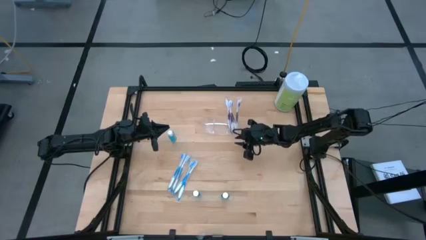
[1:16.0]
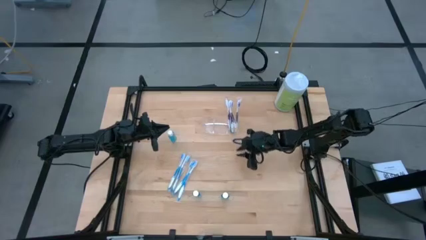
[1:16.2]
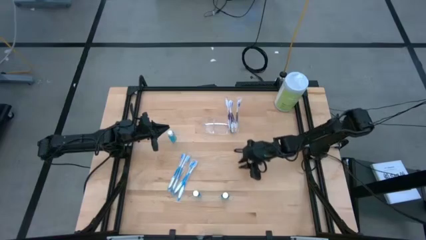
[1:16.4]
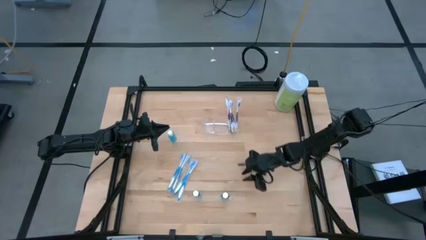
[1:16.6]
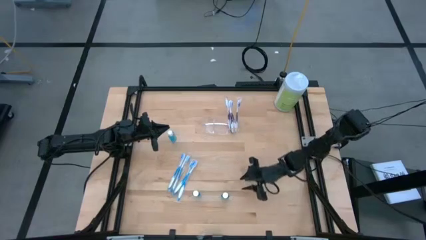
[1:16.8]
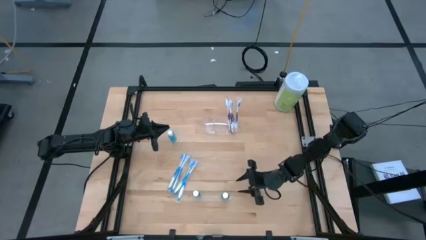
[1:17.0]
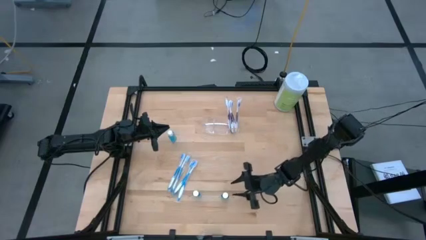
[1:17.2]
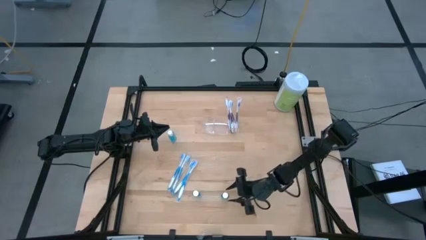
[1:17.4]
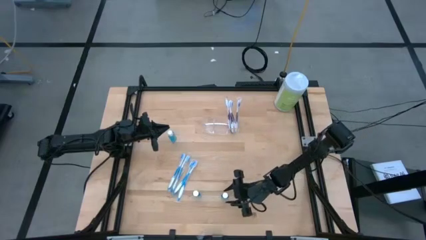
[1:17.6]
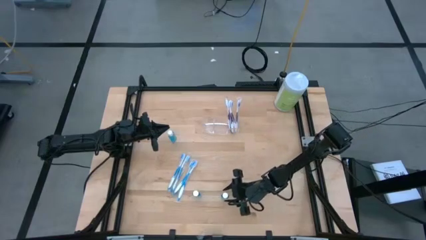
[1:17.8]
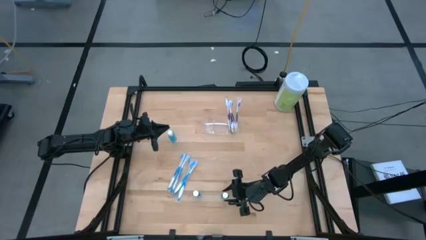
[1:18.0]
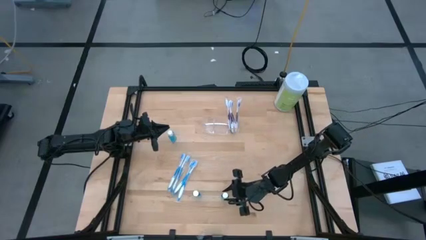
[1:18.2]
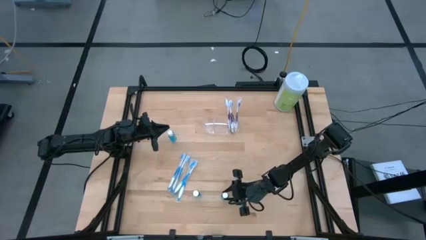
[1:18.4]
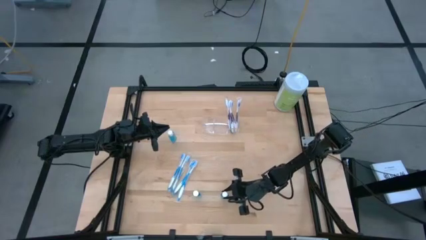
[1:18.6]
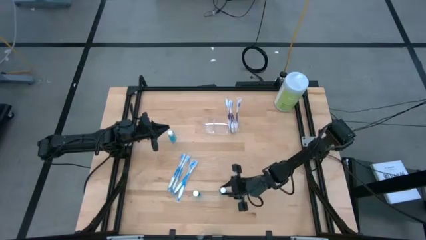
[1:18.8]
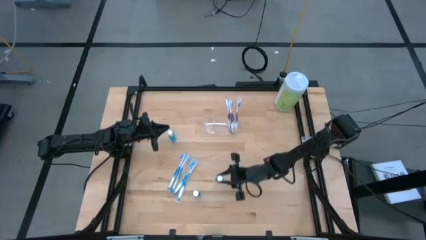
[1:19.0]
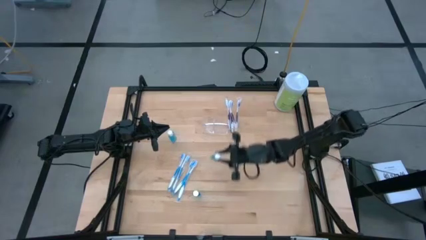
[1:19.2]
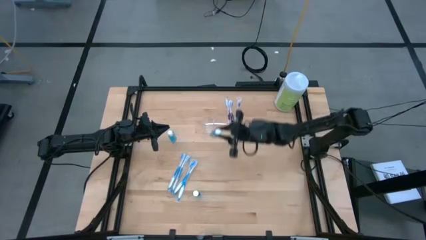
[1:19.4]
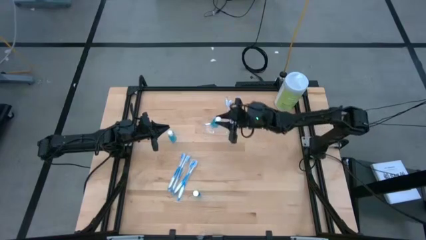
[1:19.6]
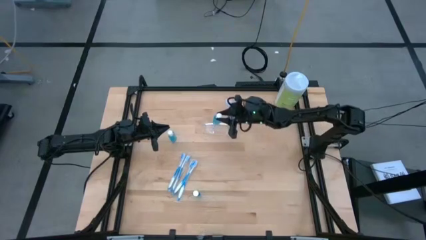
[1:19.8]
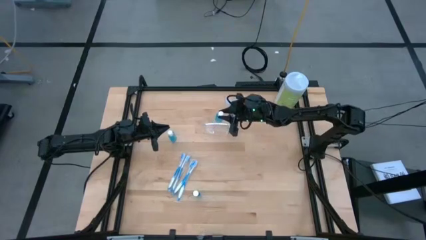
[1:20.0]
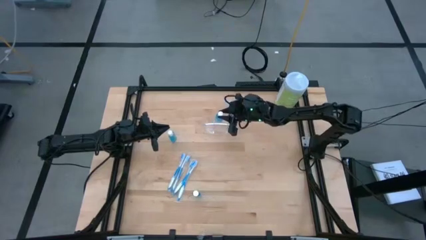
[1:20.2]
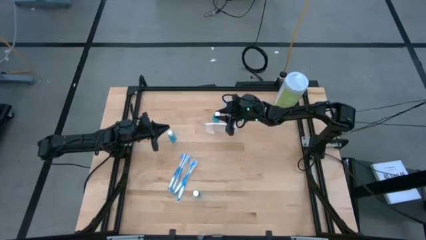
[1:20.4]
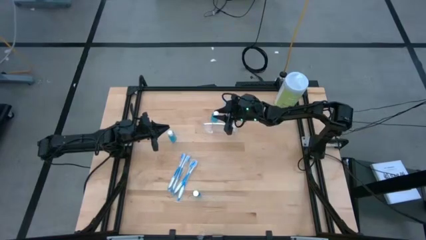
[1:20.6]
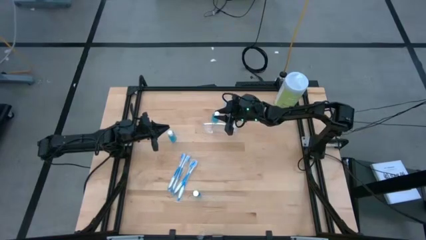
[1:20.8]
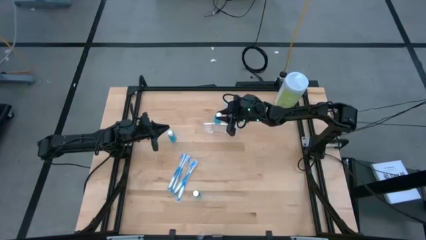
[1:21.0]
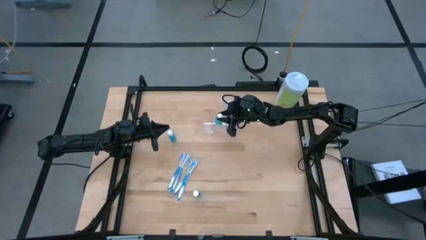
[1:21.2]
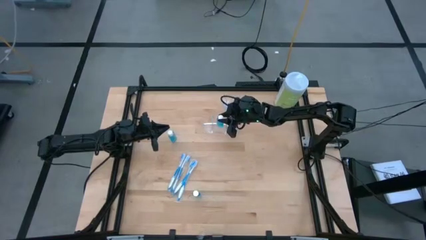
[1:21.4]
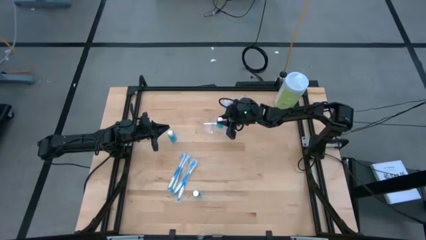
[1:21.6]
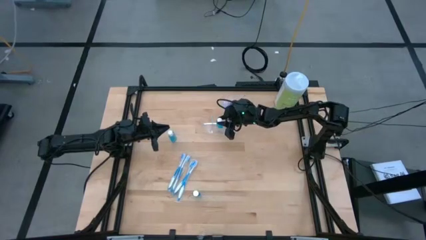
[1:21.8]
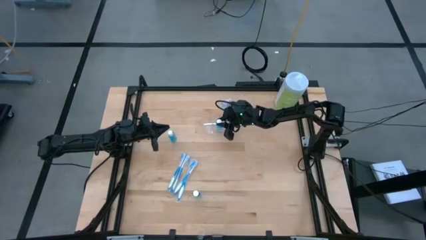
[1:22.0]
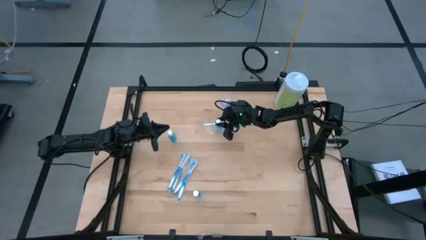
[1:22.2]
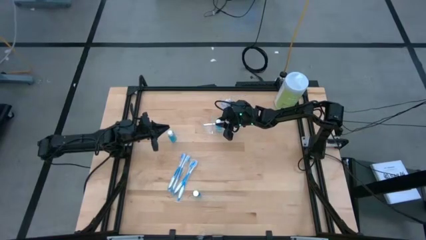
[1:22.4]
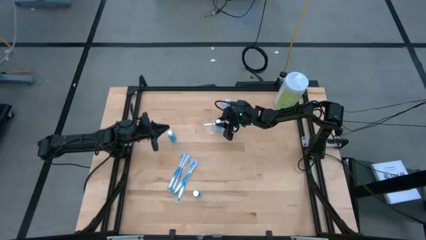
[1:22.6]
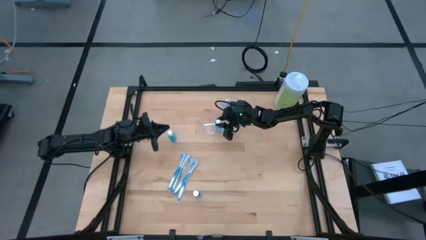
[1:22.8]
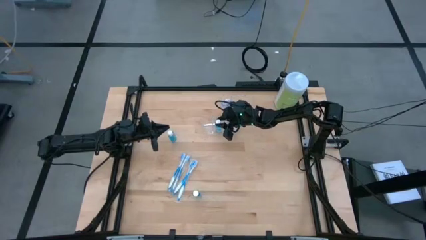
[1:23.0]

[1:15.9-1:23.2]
Task: Pick & Place toothbrushing station
Put the bottom right blue mouthwash into the transparent organizer

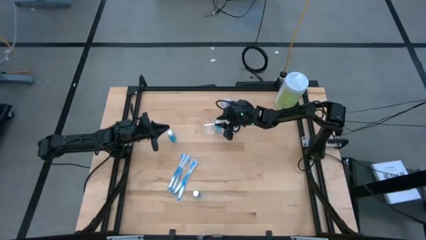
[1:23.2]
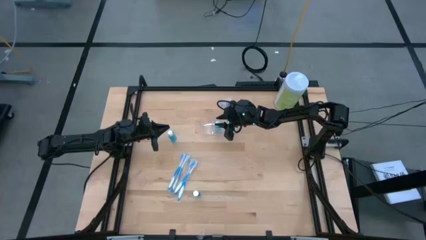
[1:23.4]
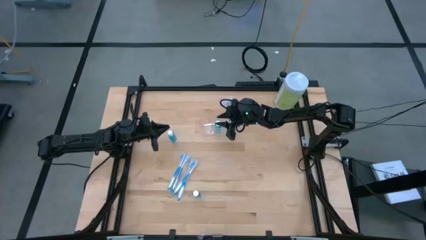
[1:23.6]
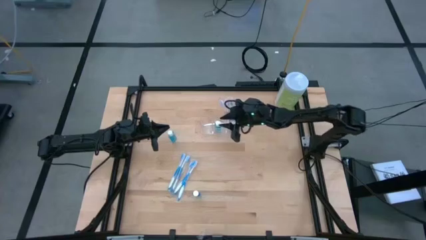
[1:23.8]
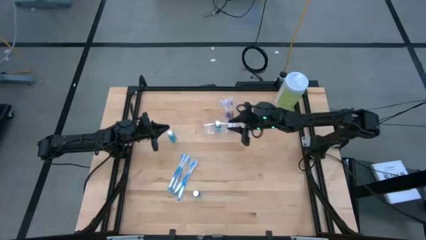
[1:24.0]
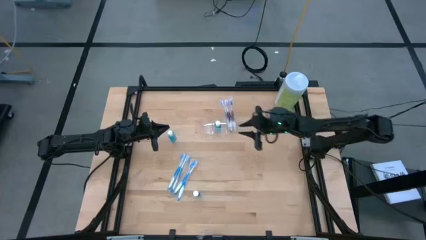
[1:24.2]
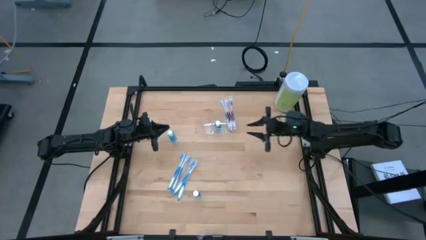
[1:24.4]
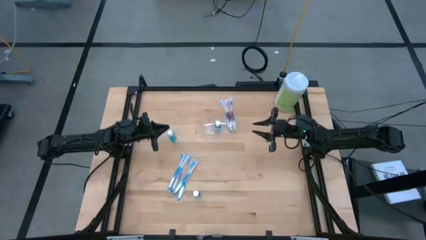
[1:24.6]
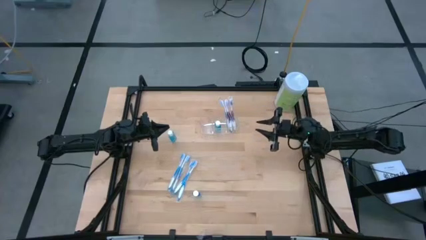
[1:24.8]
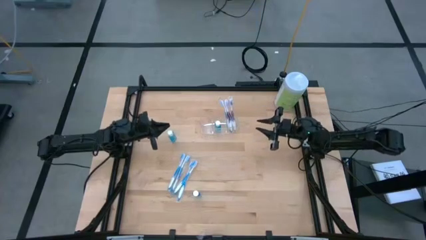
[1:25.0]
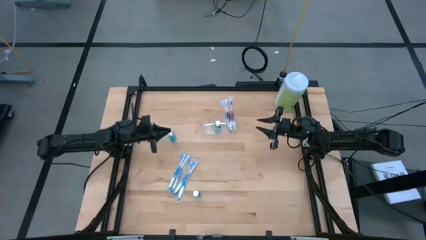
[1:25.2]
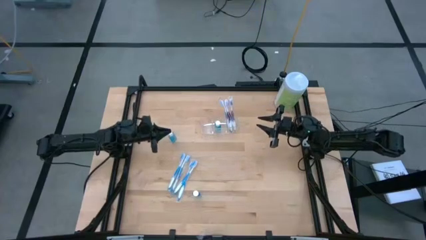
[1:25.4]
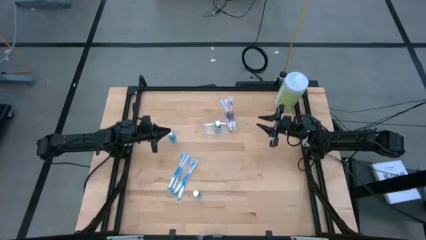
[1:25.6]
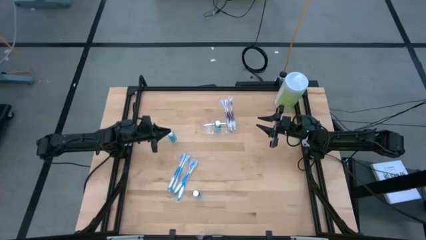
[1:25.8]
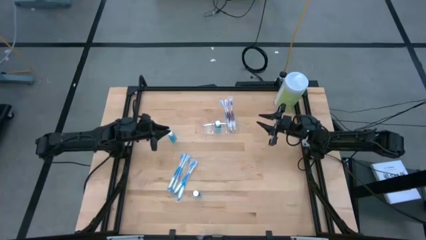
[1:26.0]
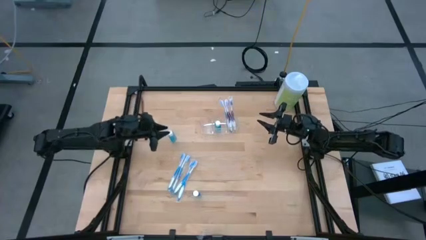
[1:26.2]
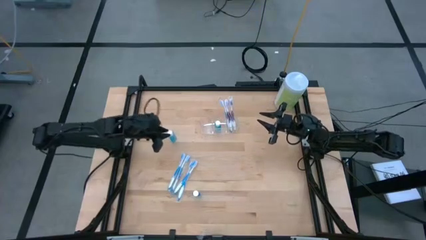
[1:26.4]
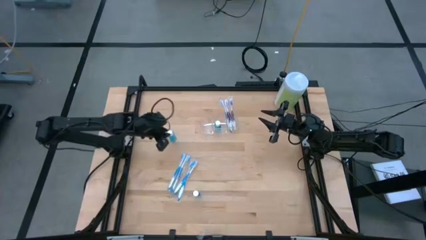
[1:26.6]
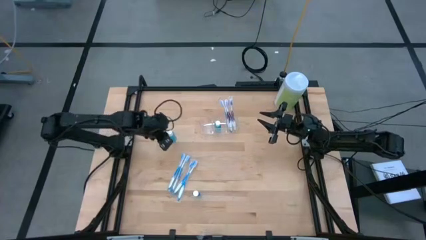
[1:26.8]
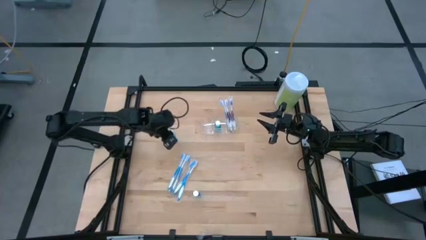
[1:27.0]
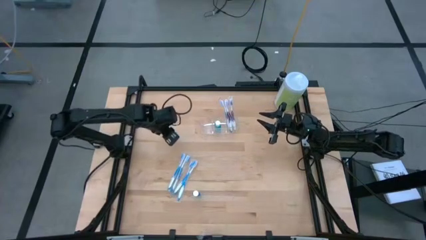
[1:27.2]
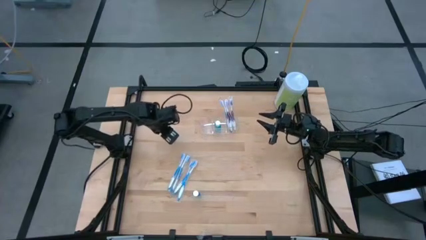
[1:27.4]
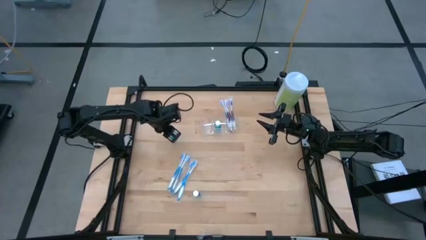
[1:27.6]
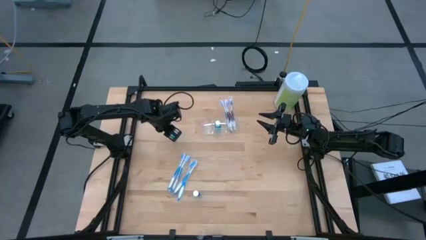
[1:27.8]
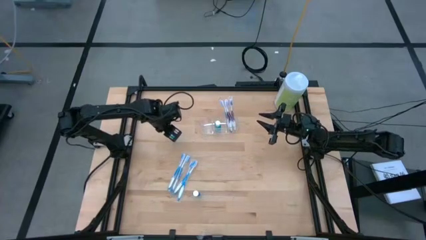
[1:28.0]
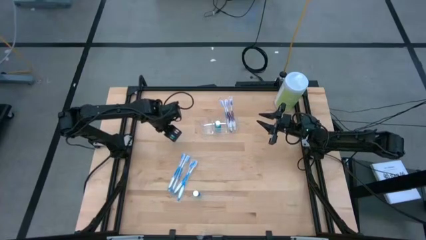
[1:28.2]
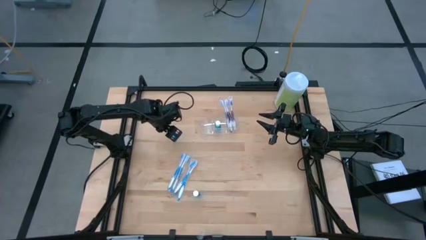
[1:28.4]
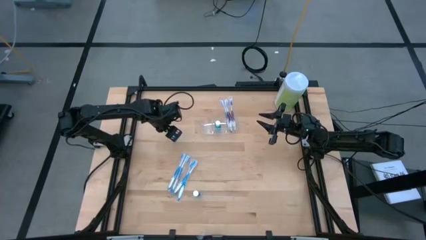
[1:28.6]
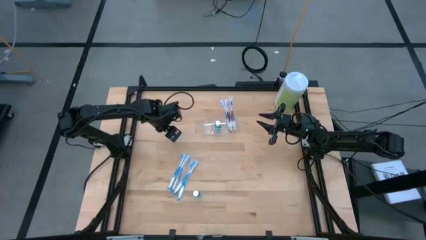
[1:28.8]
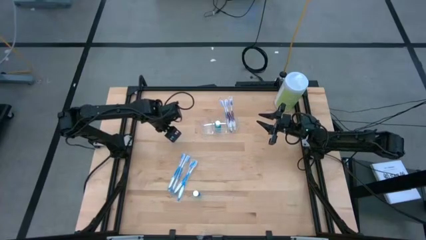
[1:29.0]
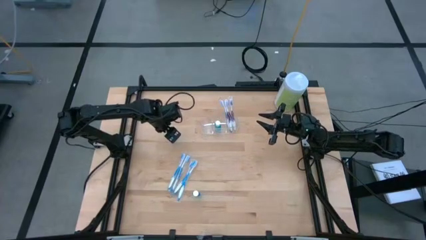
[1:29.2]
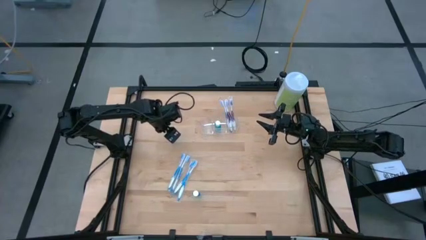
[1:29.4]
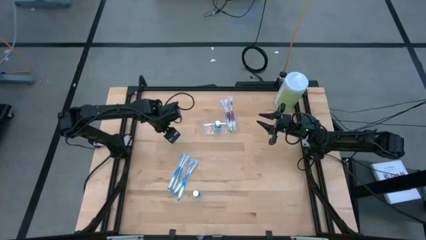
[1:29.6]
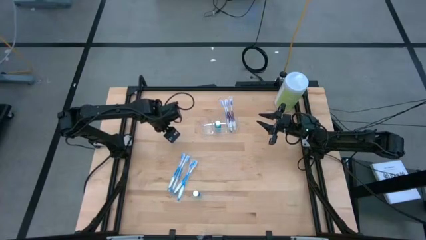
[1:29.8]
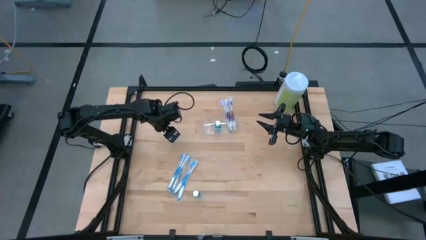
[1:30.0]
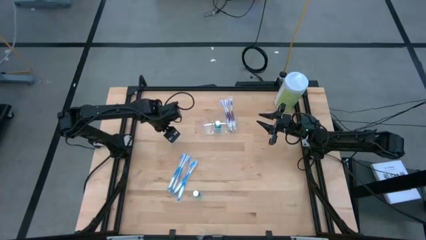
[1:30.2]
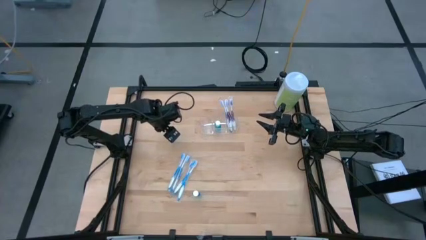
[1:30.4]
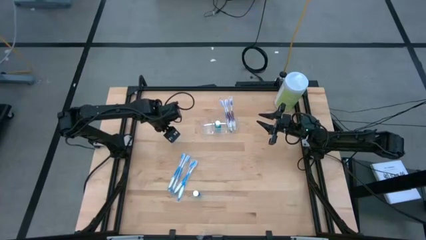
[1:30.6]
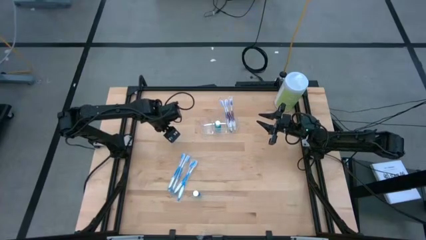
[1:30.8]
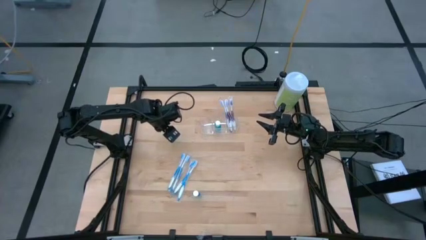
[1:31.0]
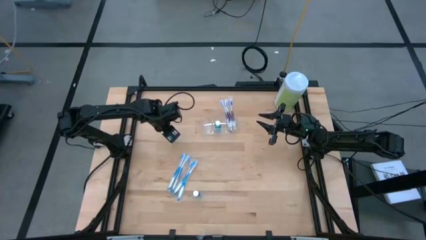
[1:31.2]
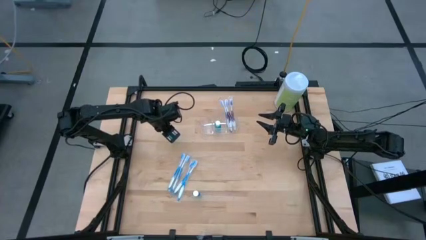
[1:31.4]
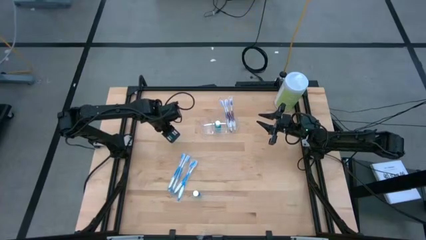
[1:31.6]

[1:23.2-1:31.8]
Put the top blue mouthwash into the transparent organizer

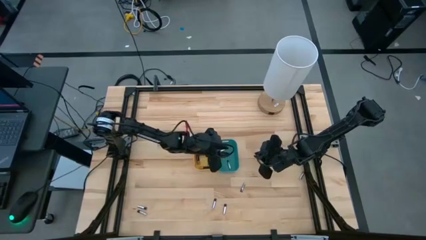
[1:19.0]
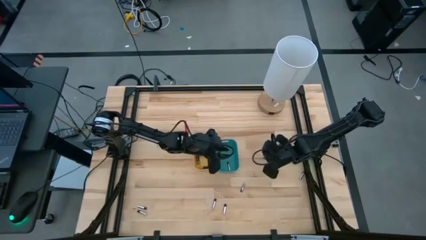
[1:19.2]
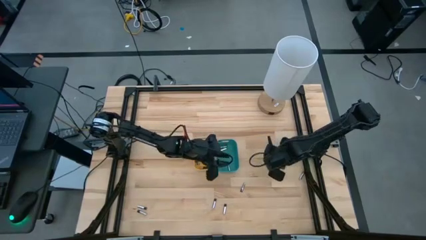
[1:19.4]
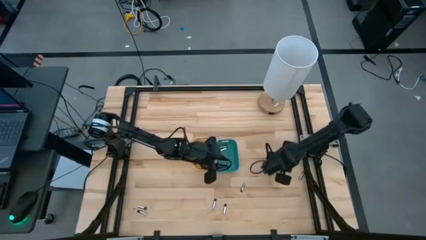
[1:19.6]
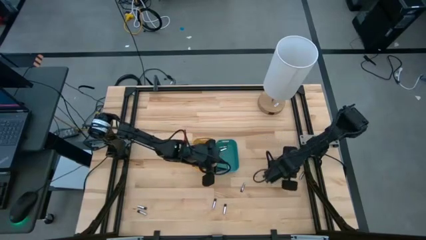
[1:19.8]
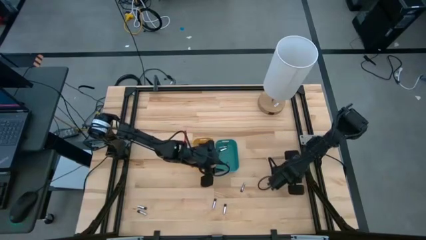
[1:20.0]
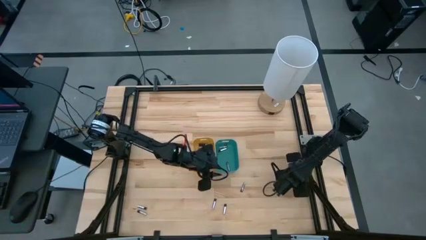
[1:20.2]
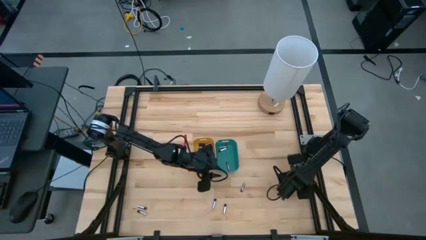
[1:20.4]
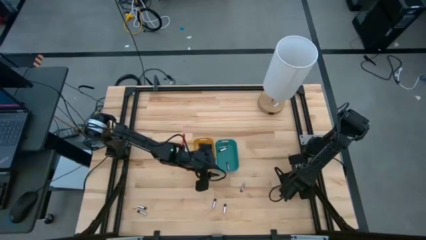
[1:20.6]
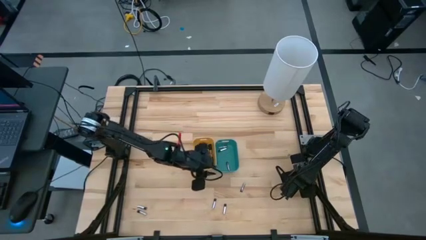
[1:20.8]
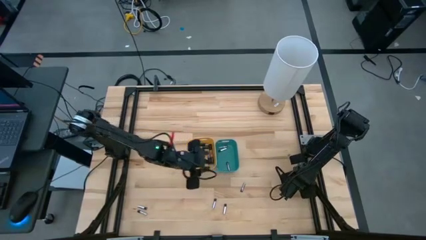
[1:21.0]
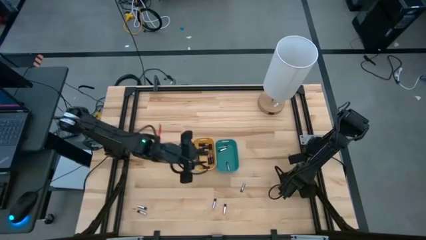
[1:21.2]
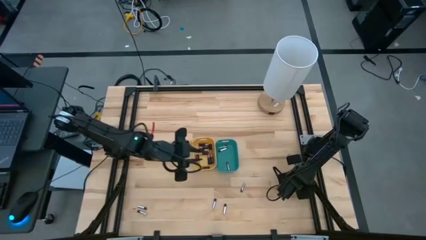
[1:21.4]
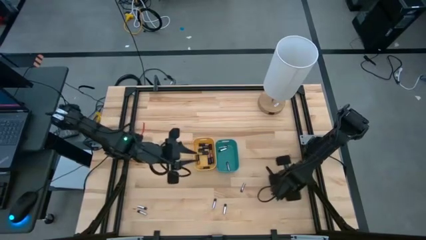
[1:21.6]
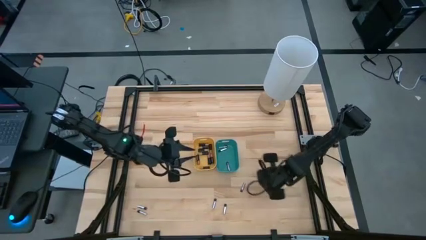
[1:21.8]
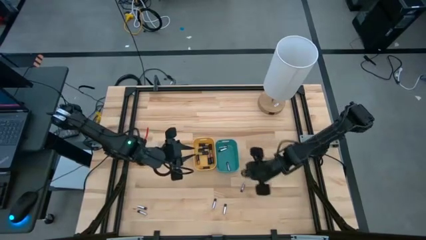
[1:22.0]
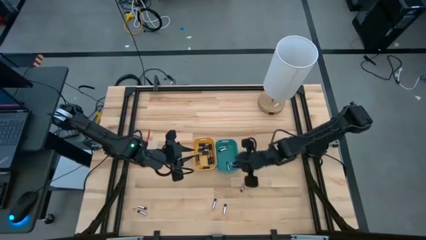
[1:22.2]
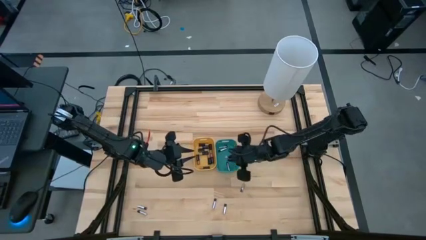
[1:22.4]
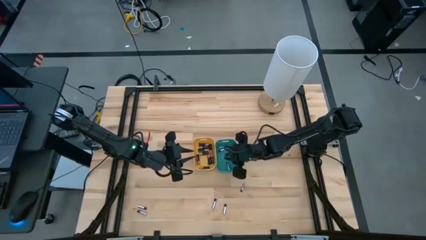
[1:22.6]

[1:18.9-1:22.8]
Task: Sort batteries
Put the silver battery into the green bin
